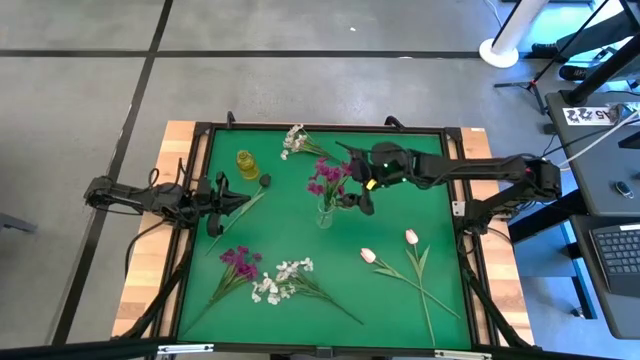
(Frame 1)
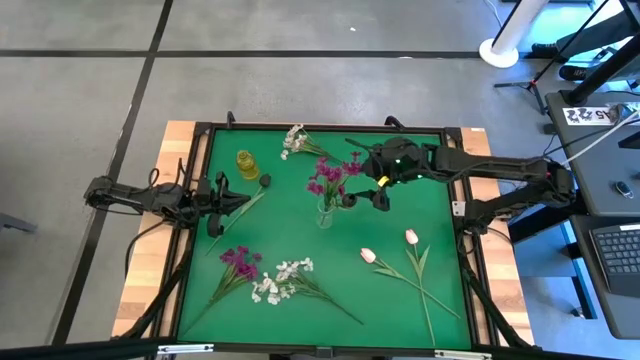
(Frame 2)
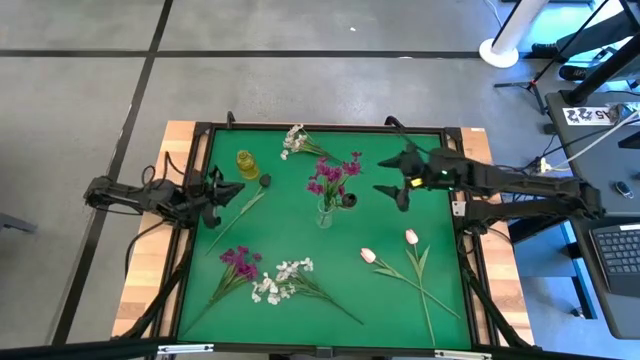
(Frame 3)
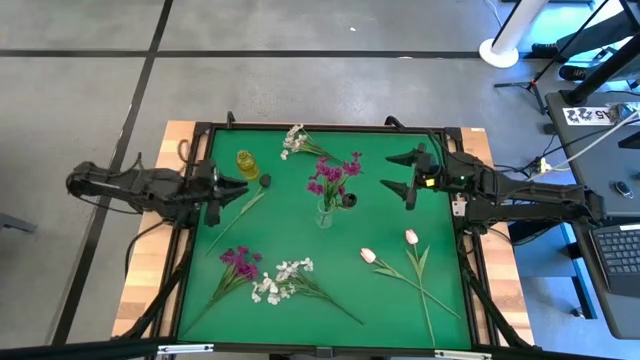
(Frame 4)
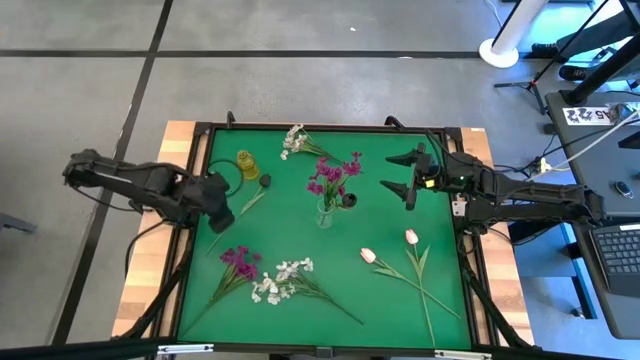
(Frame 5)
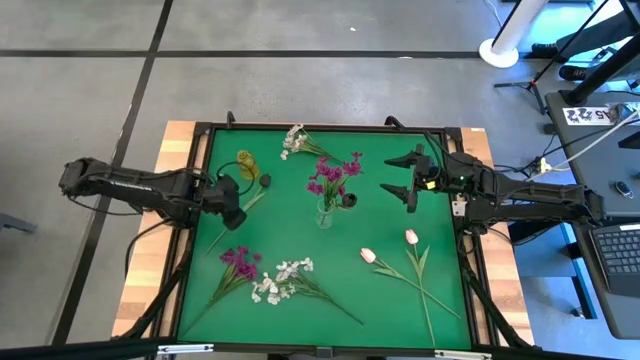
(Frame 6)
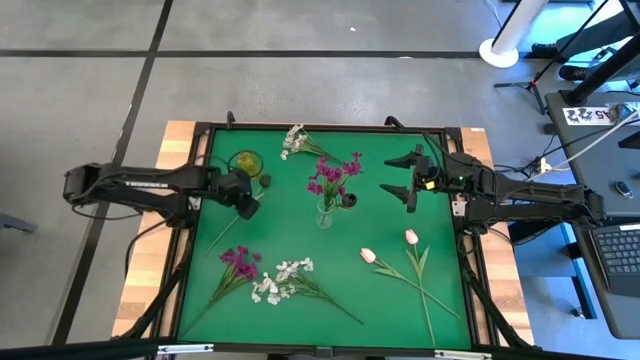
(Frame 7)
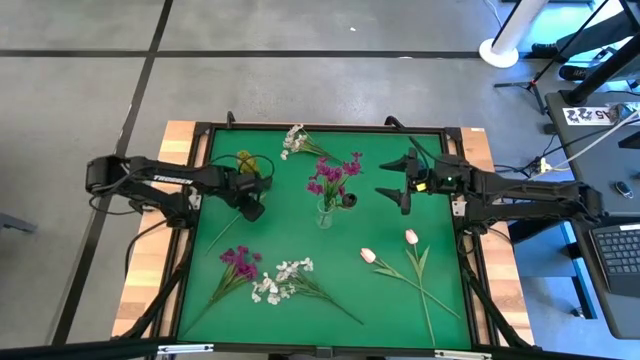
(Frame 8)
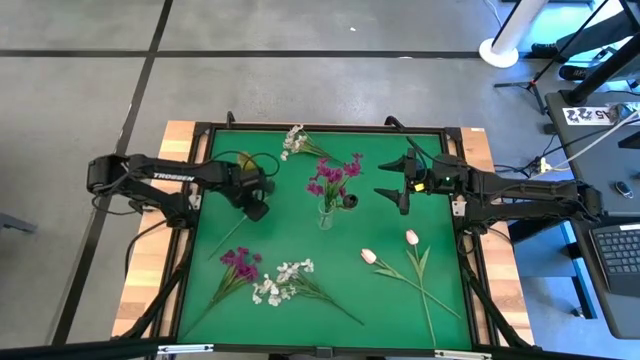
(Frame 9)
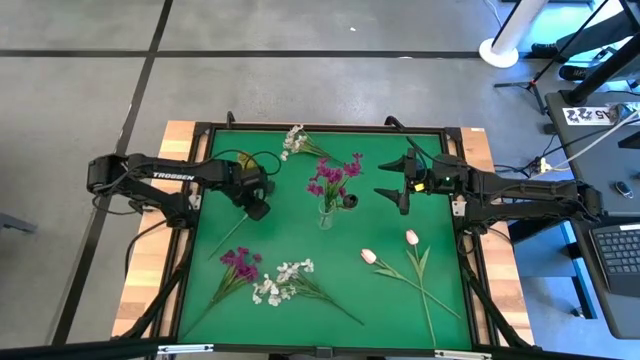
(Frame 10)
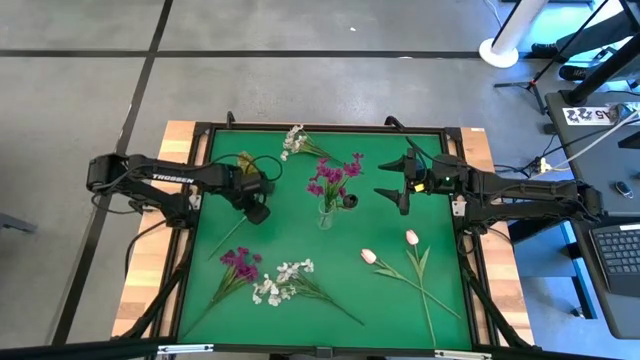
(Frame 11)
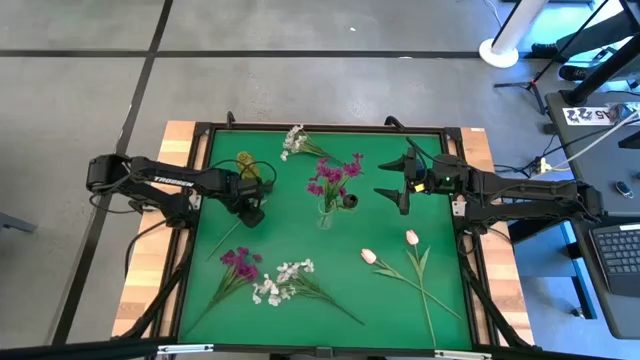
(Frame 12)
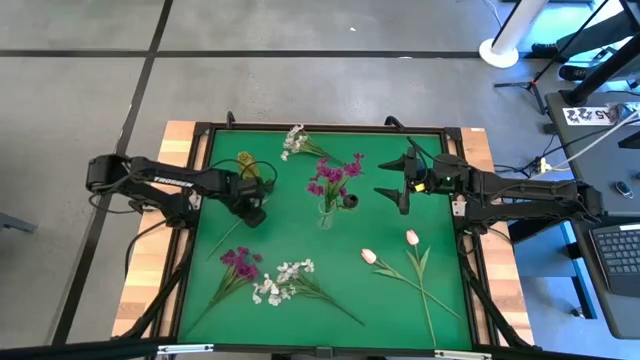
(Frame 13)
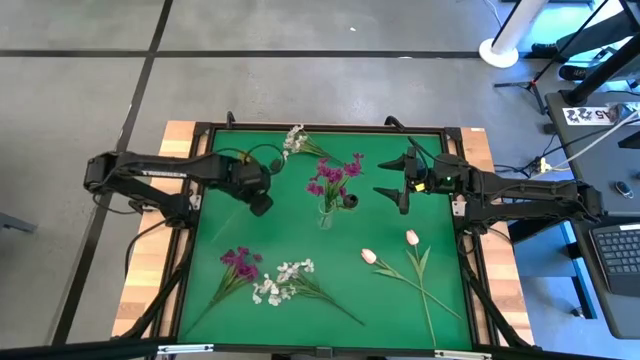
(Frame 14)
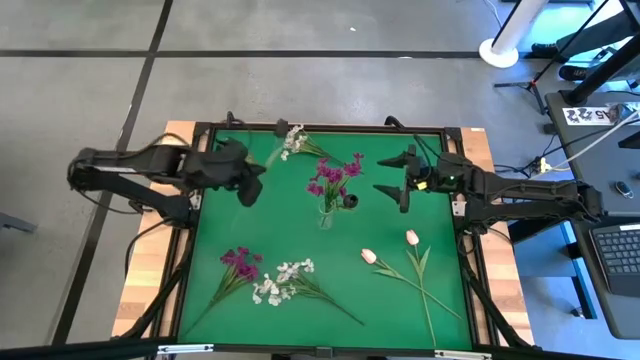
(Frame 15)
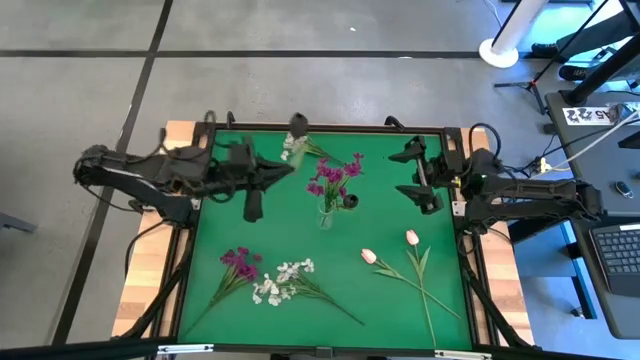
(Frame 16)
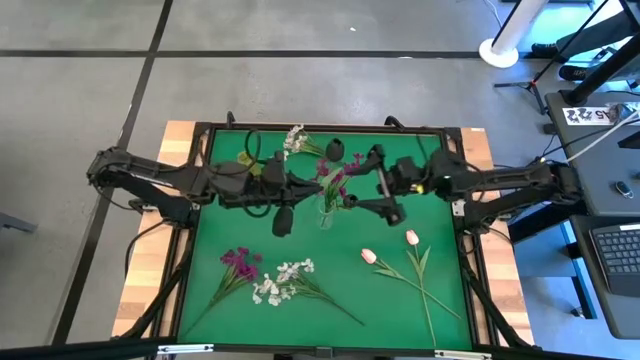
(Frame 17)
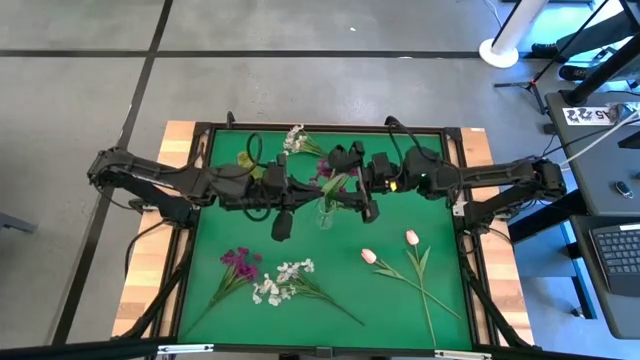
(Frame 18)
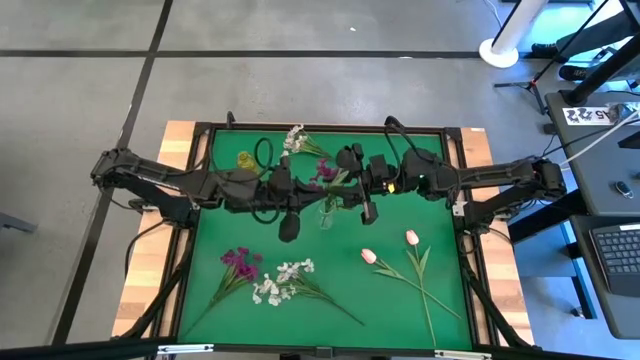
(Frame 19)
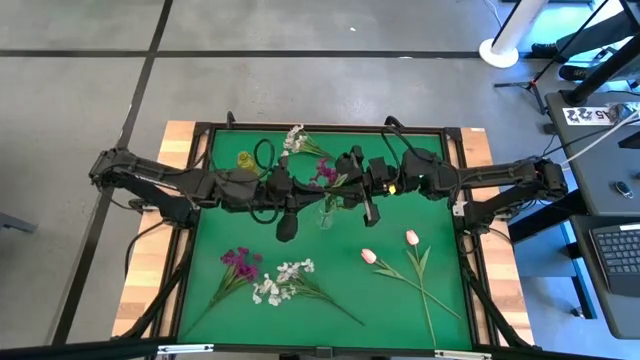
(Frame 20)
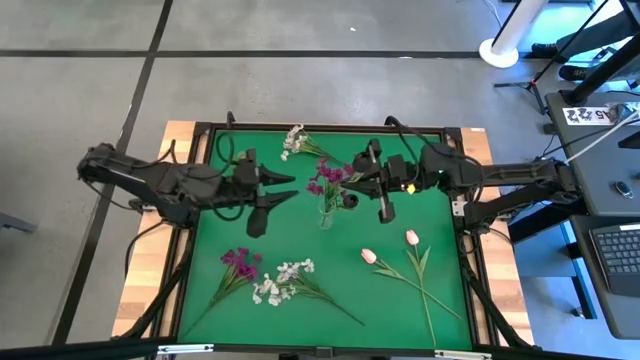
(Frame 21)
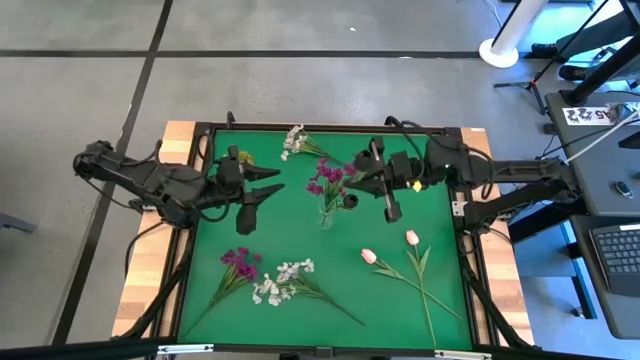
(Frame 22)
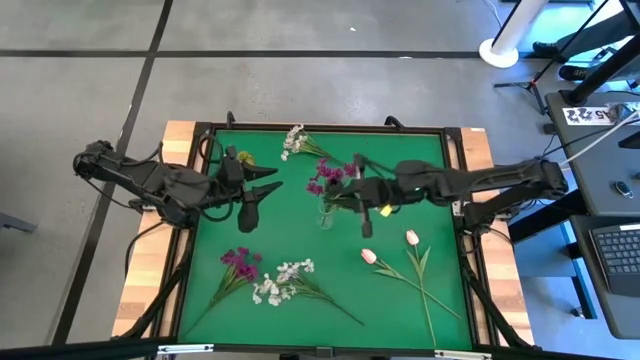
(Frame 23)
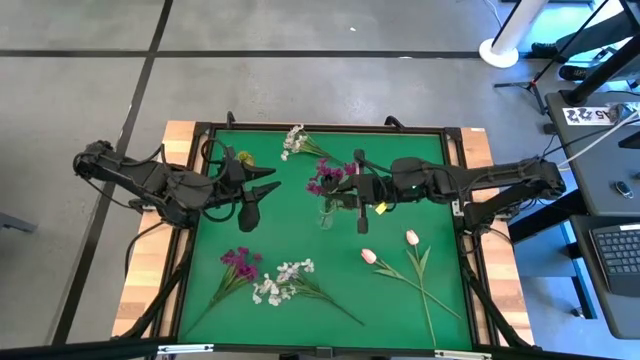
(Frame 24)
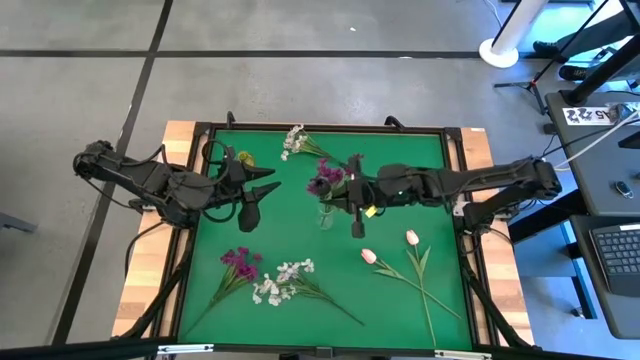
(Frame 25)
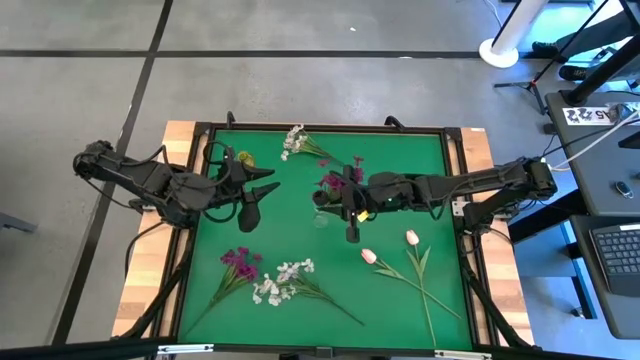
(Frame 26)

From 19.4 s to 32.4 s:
Task: Sort flowers into vase by color
Put the black tulip into the transparent vase

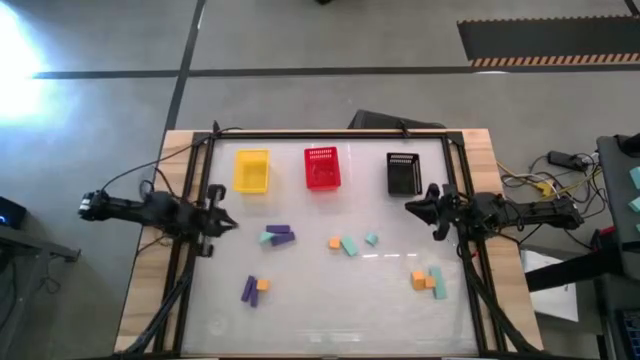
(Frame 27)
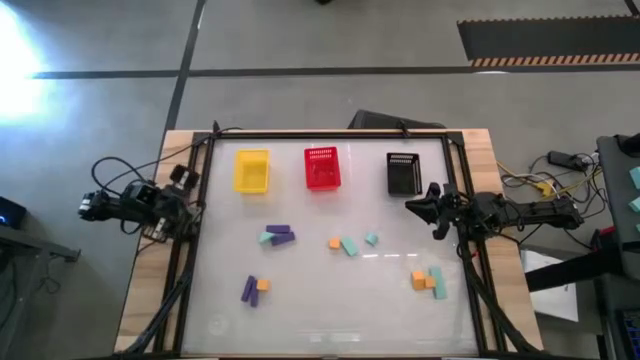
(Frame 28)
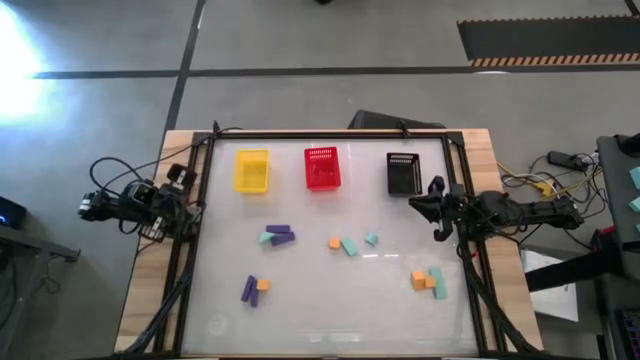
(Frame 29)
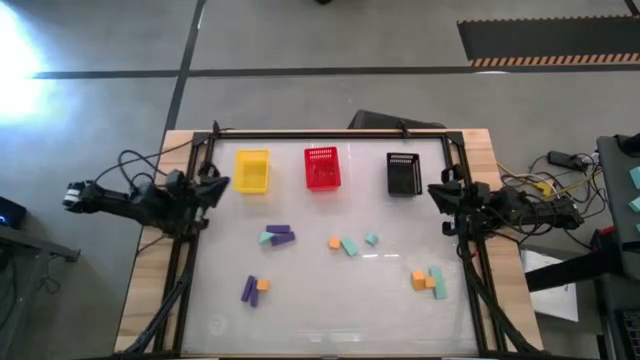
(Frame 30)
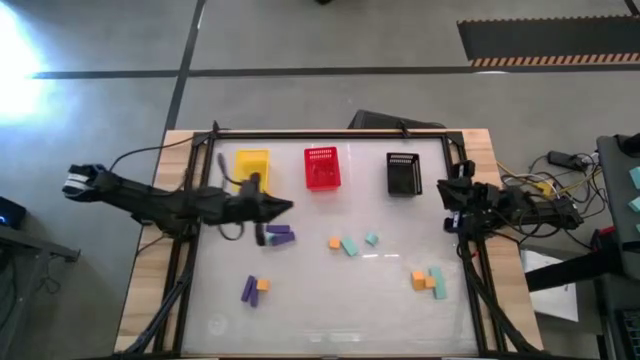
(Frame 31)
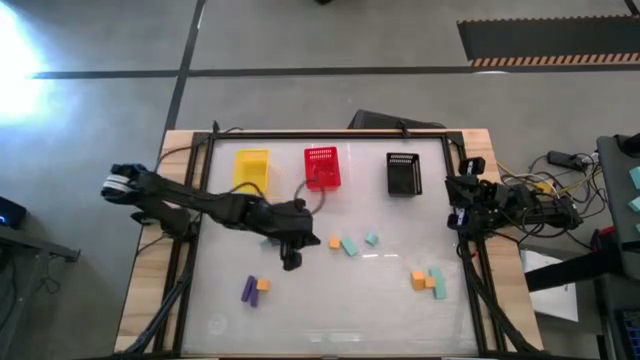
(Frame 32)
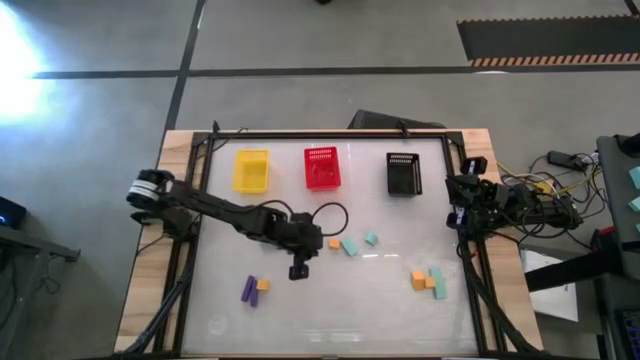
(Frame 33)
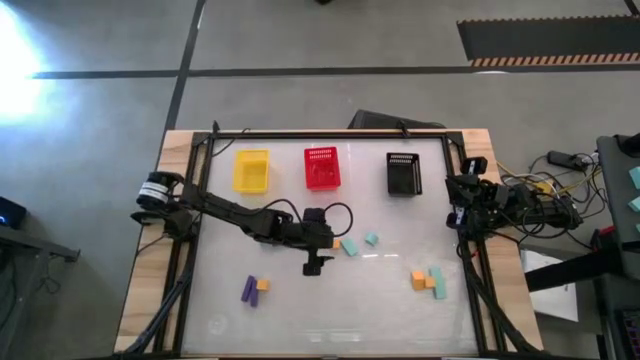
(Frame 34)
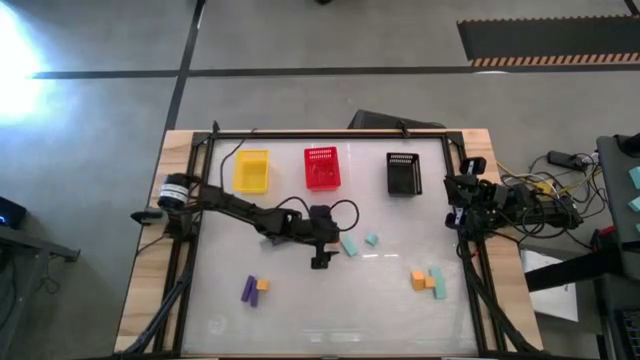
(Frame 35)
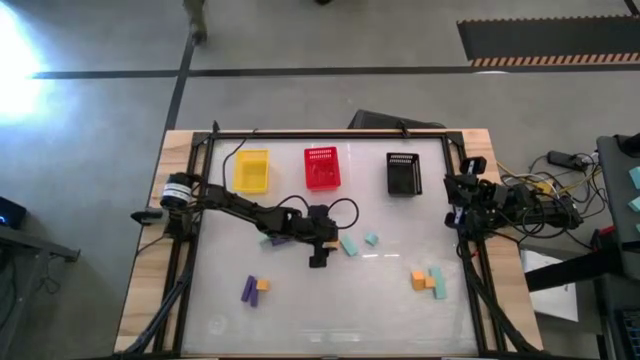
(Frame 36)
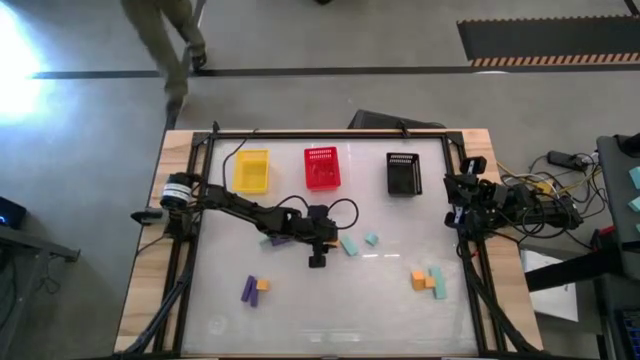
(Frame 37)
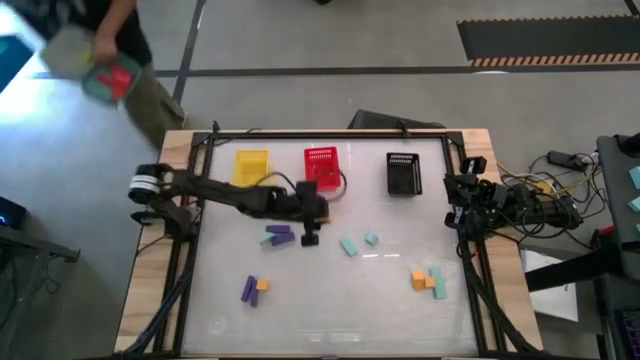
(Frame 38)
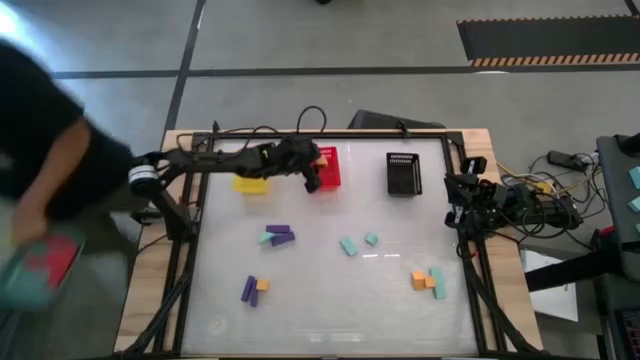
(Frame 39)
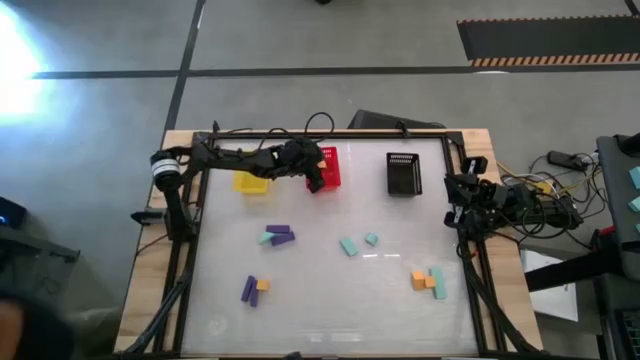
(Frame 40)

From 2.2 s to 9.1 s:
Task: Sort & place blocks by color
Put the yellow block into the red bin
